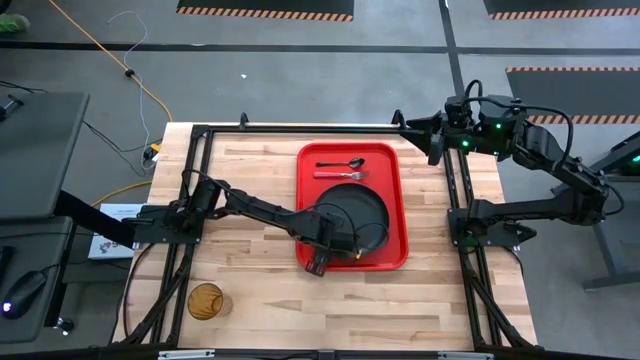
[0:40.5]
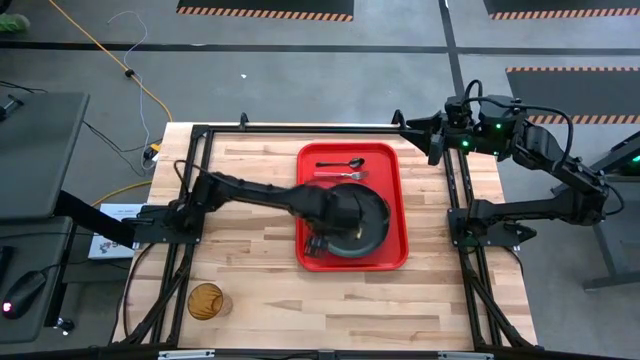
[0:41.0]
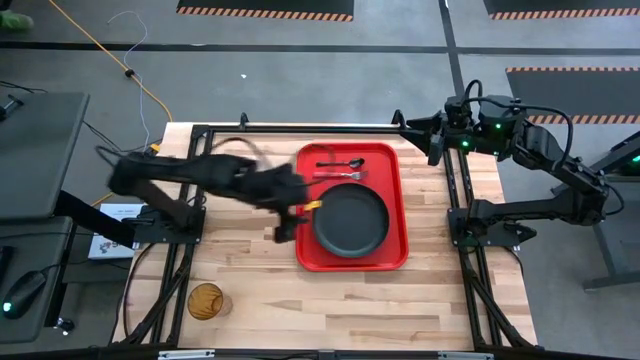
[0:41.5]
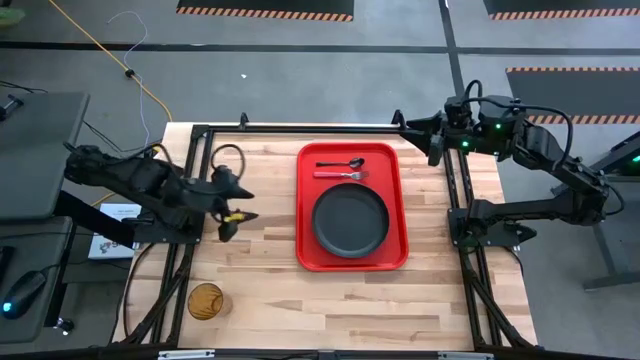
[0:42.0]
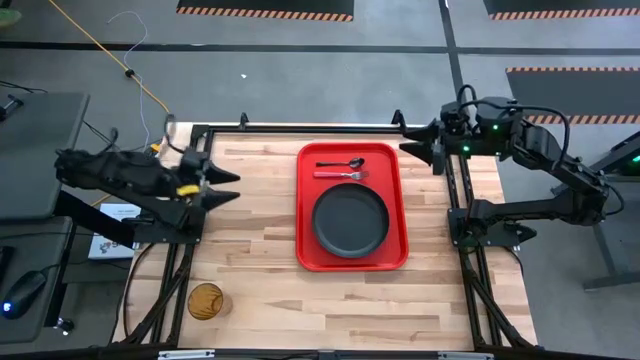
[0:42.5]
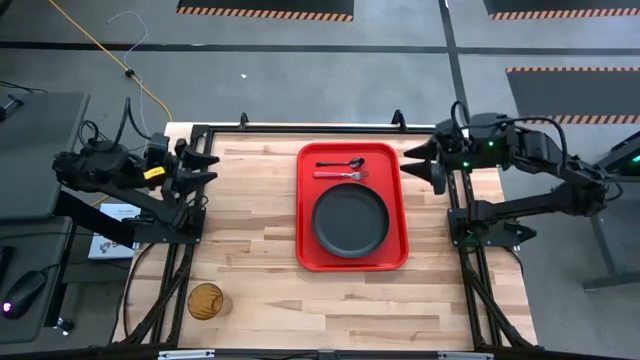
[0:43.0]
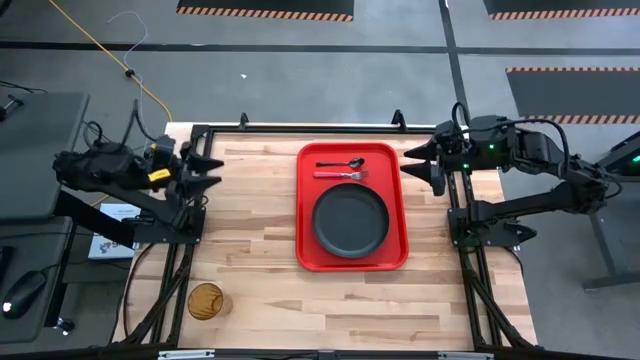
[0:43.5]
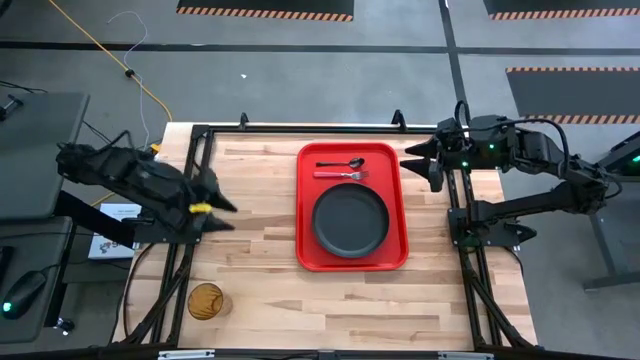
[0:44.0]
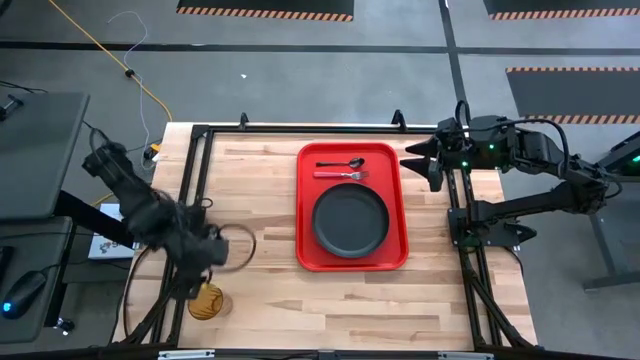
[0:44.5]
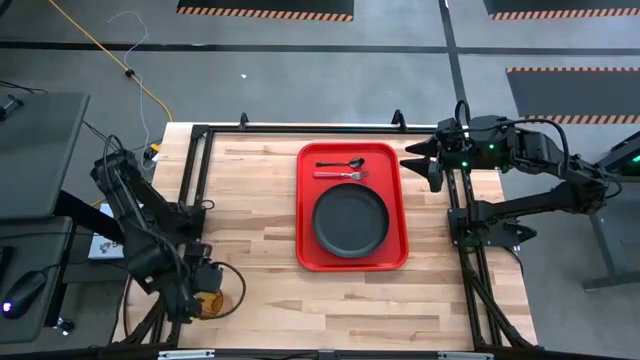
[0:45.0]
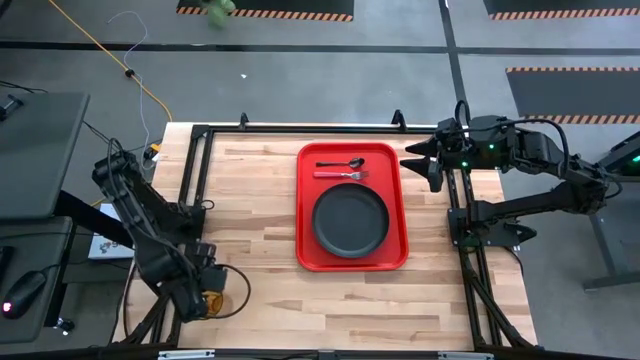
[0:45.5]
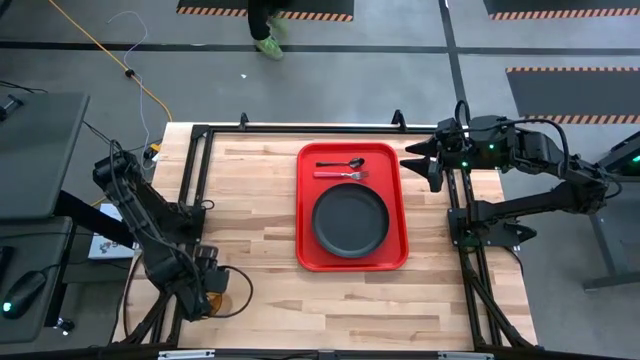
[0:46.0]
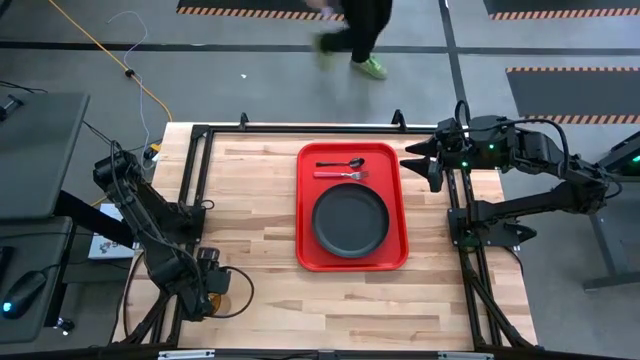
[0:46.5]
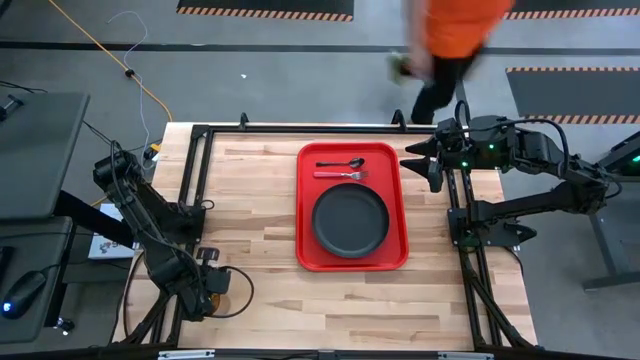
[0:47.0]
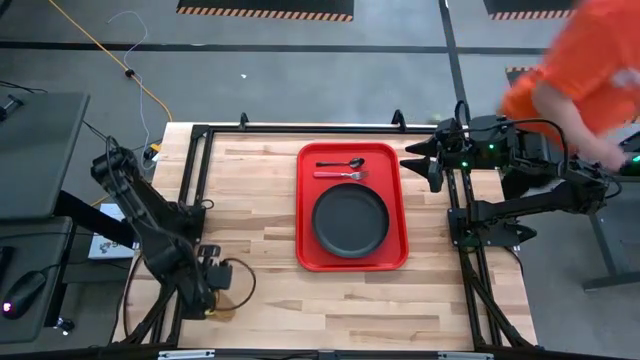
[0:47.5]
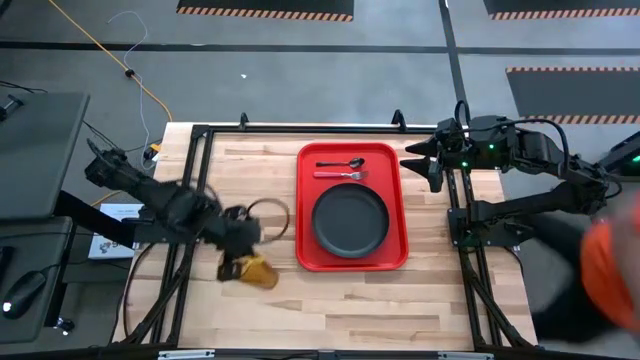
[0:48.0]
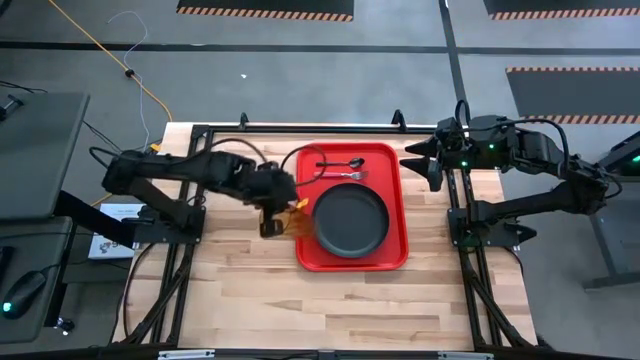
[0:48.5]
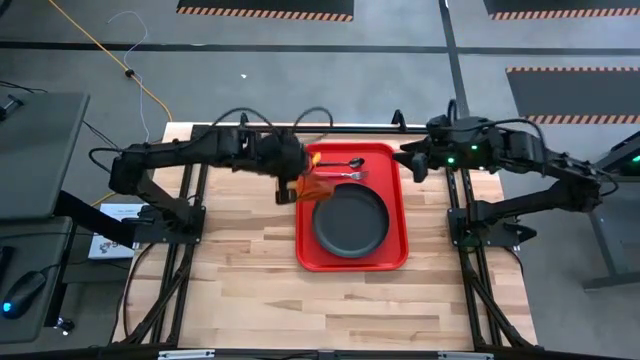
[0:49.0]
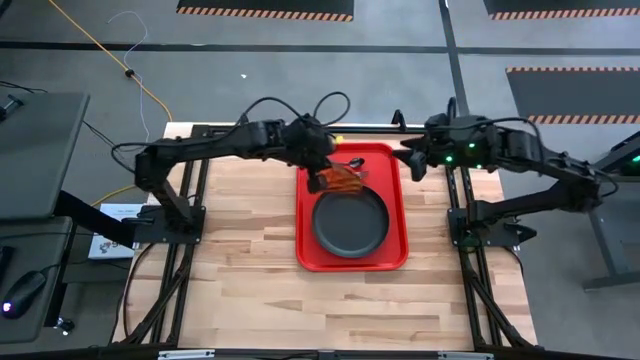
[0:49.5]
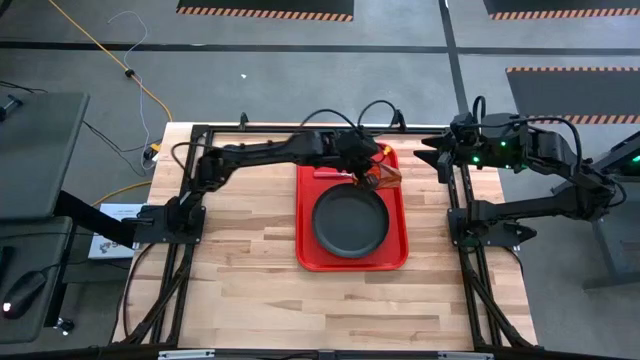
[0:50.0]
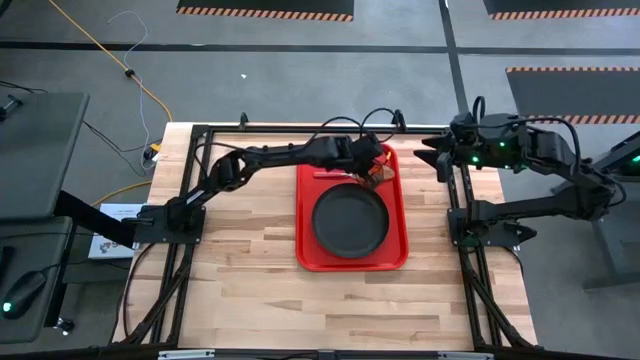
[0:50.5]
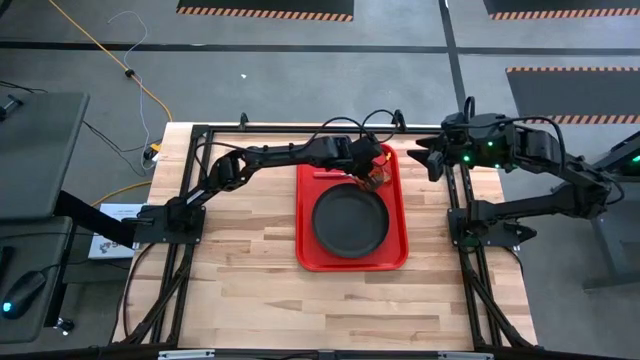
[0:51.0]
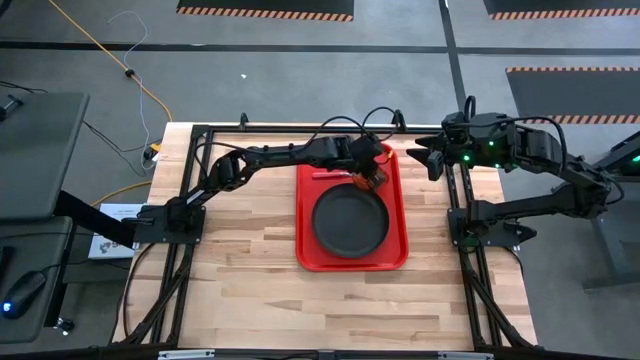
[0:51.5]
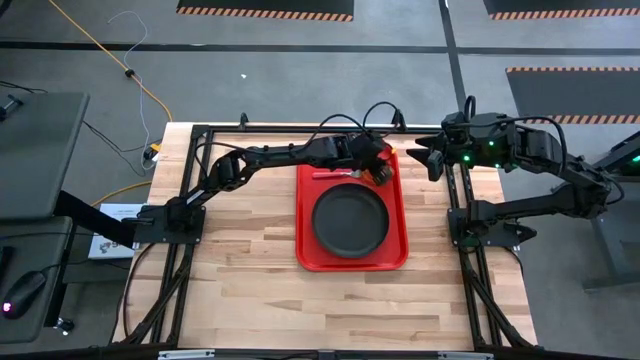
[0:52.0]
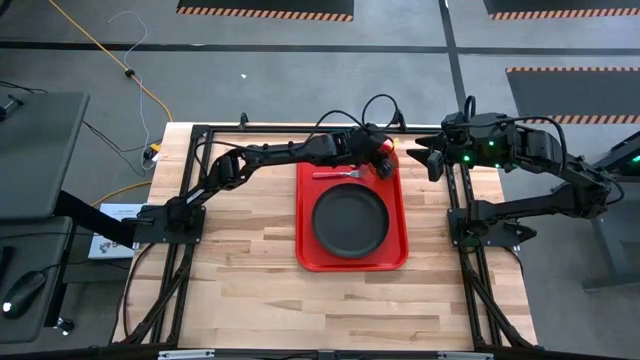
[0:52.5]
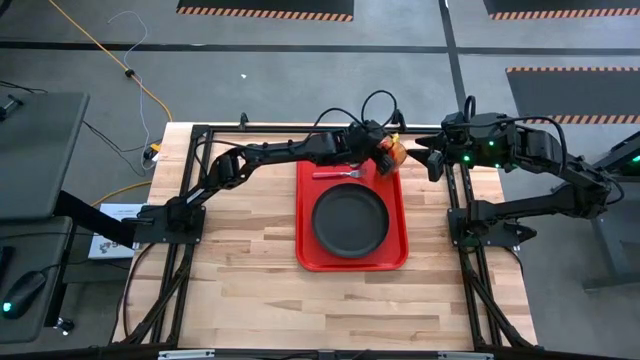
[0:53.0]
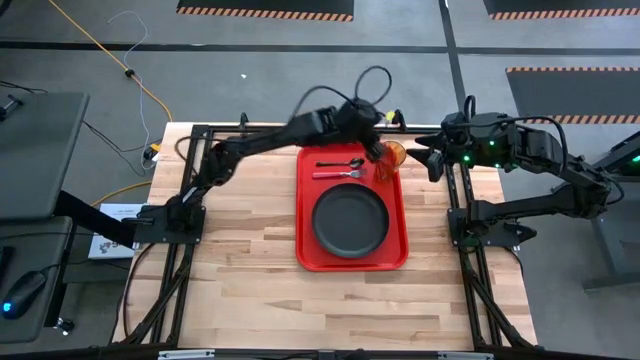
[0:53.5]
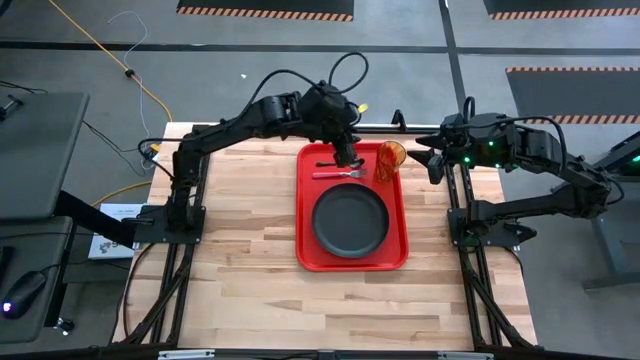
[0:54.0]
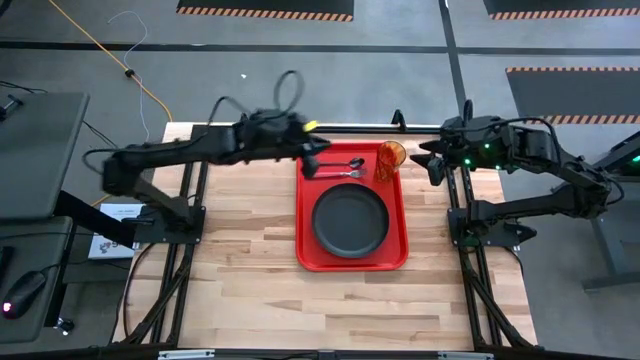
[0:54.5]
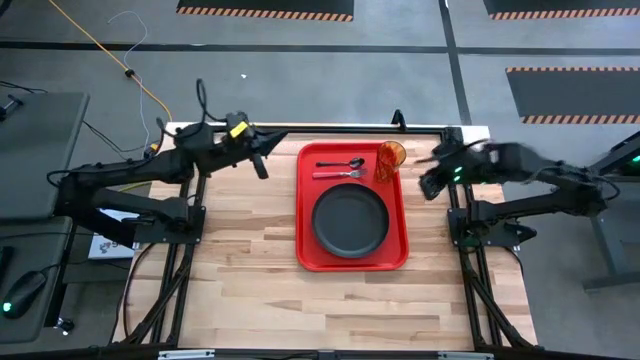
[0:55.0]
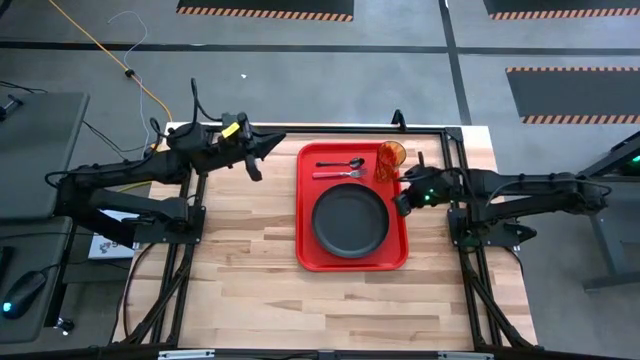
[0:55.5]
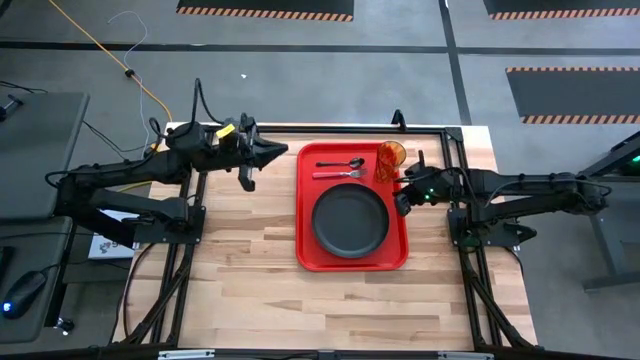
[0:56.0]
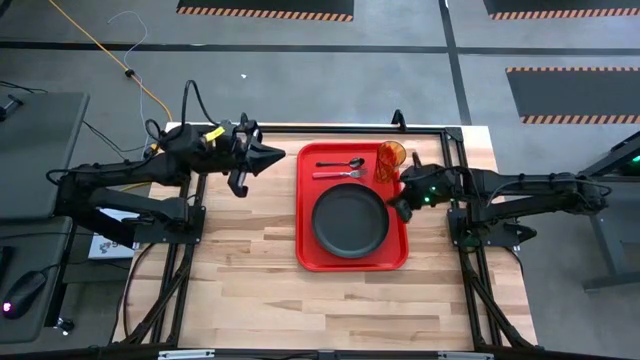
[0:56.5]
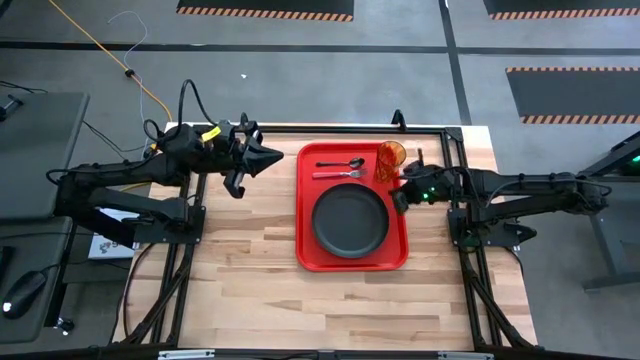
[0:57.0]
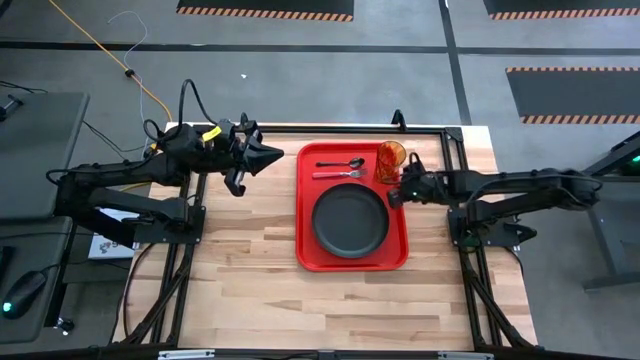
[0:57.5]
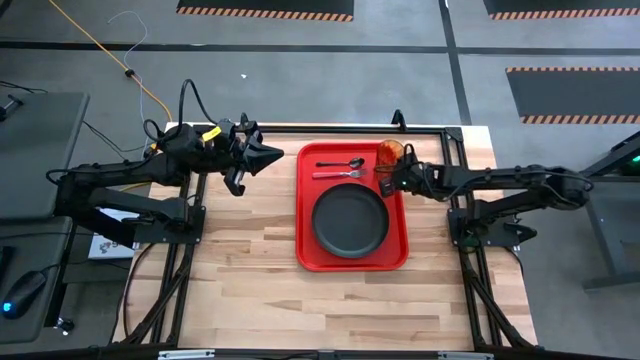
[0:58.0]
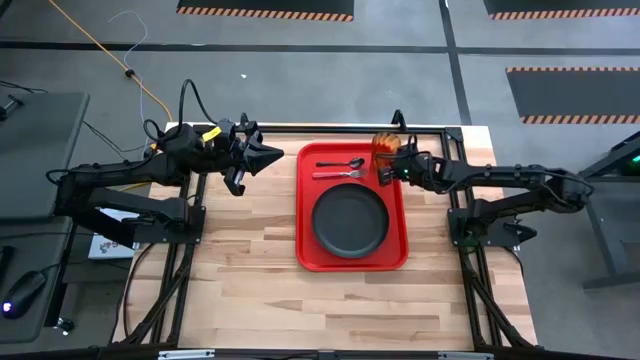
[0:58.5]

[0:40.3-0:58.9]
Task: Pick and place plate/cup/fork/spoon on tray
Put the yellow glass on the red tray to the left of the black spoon
